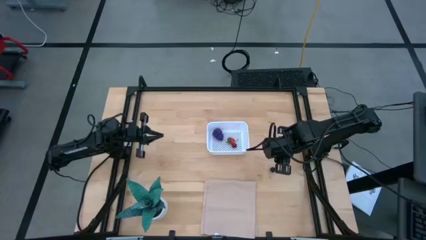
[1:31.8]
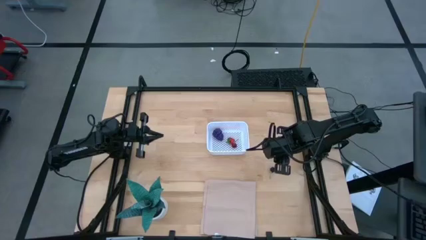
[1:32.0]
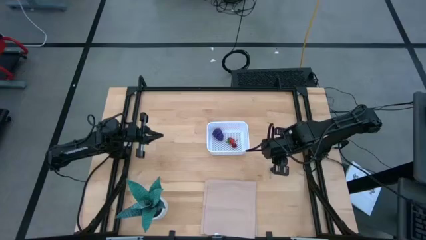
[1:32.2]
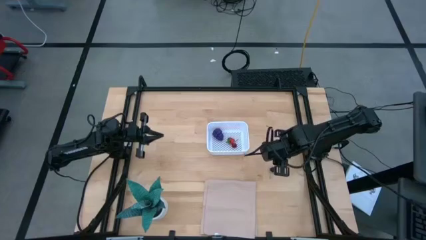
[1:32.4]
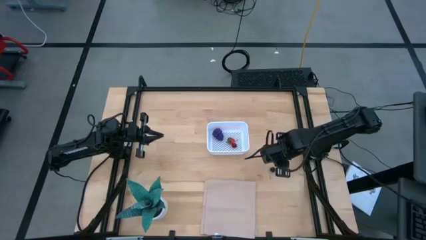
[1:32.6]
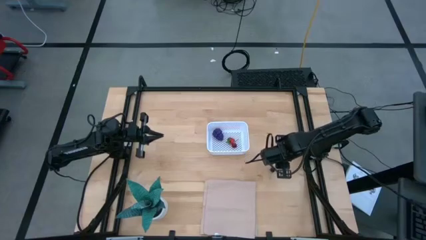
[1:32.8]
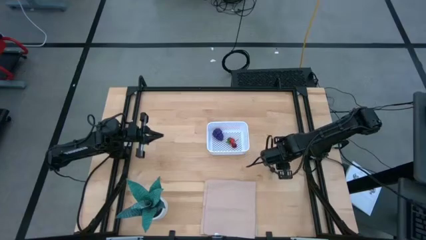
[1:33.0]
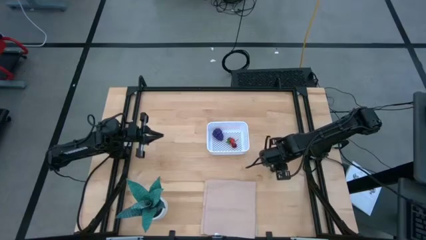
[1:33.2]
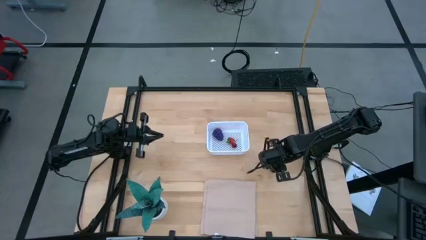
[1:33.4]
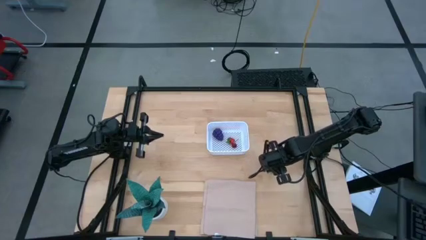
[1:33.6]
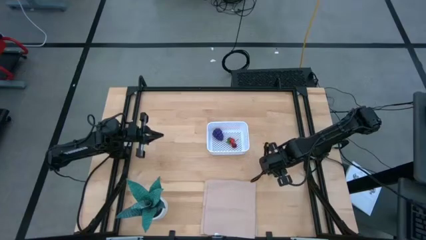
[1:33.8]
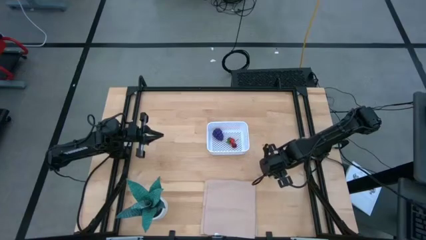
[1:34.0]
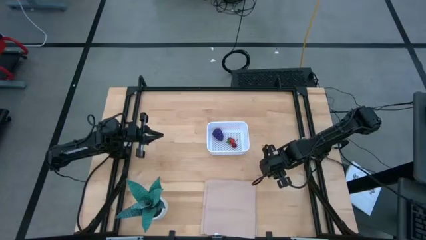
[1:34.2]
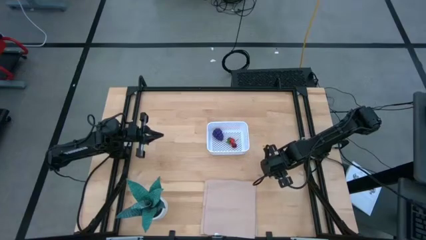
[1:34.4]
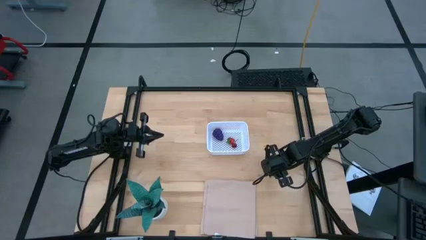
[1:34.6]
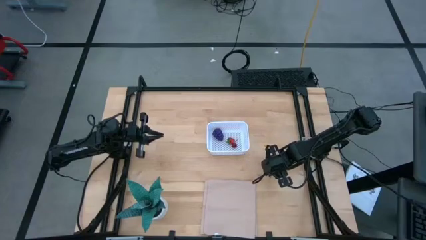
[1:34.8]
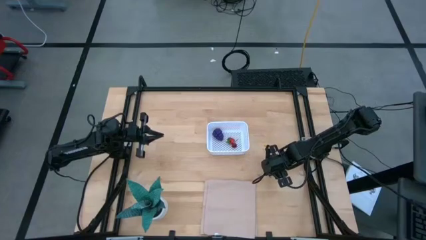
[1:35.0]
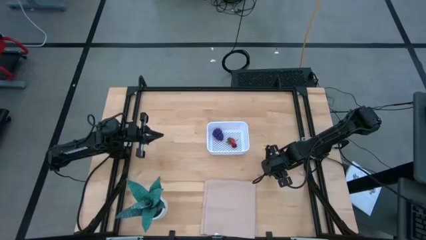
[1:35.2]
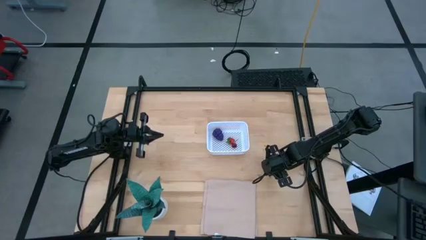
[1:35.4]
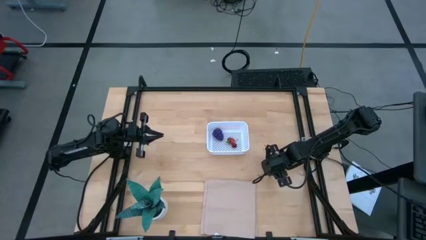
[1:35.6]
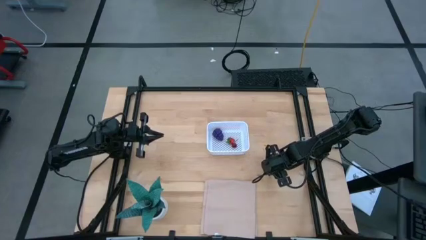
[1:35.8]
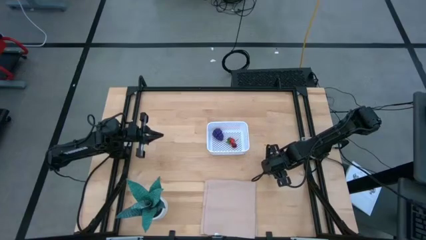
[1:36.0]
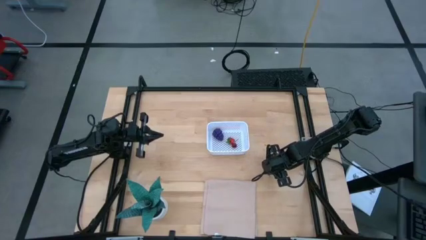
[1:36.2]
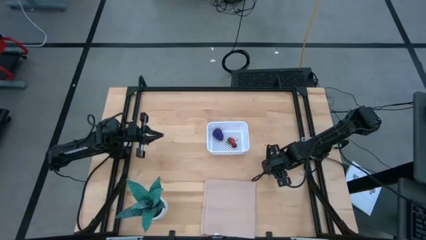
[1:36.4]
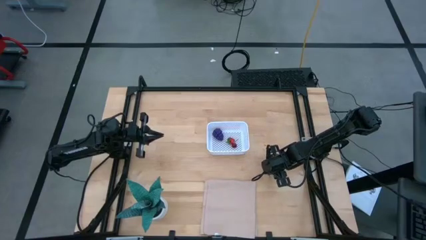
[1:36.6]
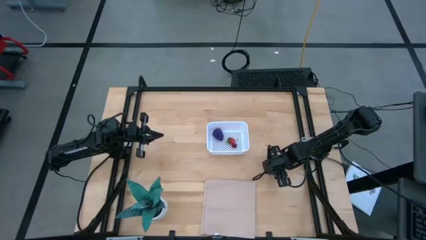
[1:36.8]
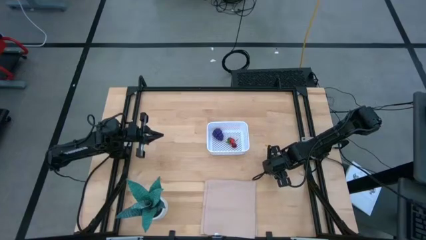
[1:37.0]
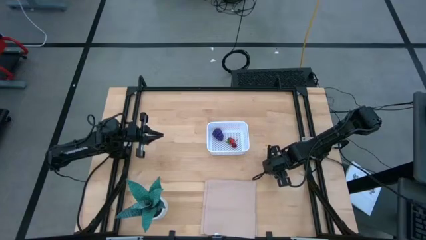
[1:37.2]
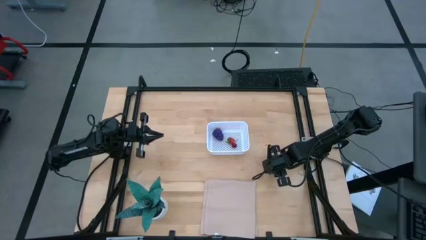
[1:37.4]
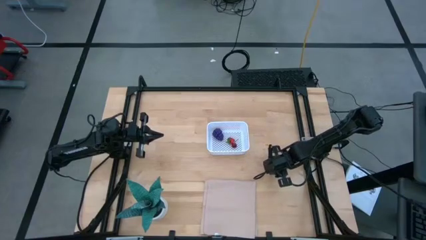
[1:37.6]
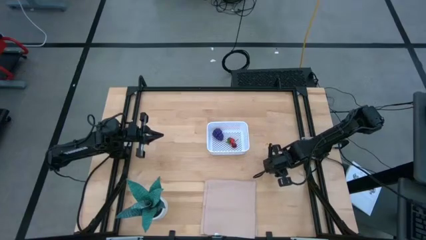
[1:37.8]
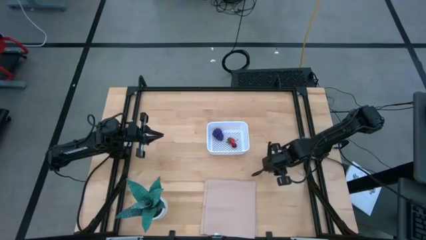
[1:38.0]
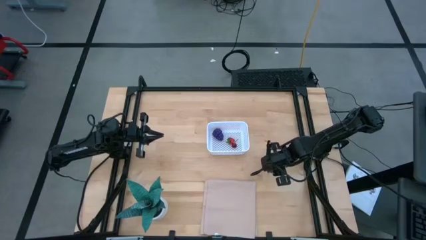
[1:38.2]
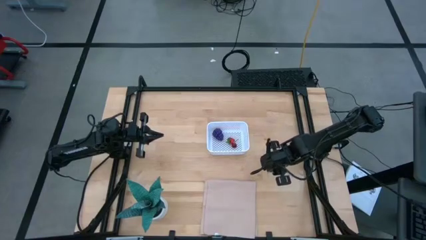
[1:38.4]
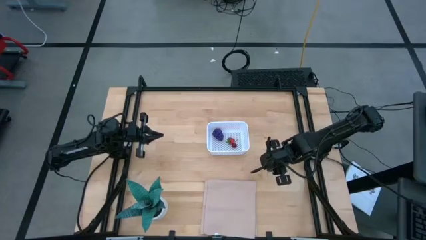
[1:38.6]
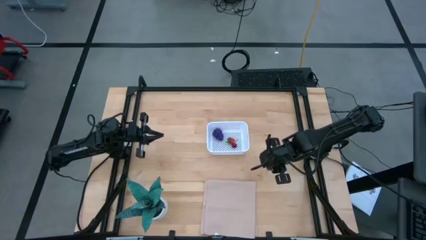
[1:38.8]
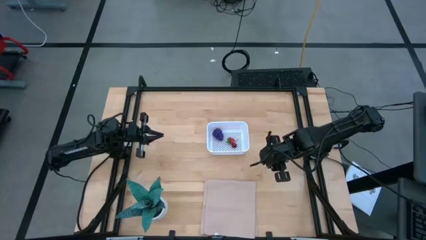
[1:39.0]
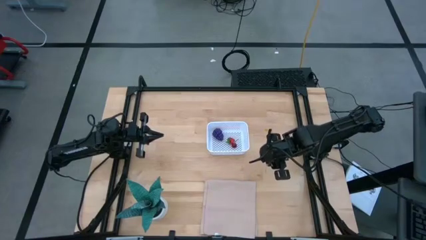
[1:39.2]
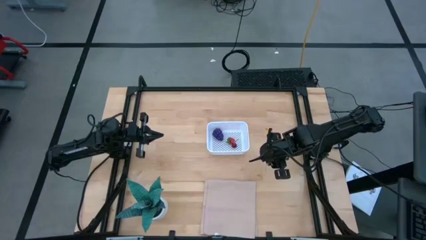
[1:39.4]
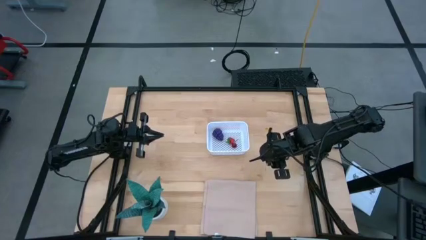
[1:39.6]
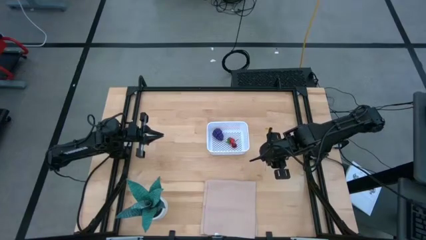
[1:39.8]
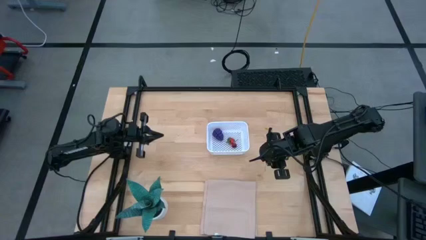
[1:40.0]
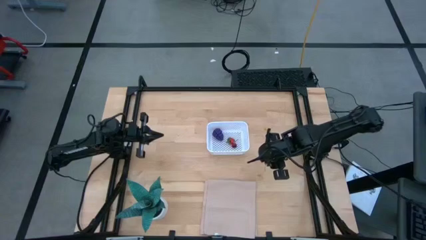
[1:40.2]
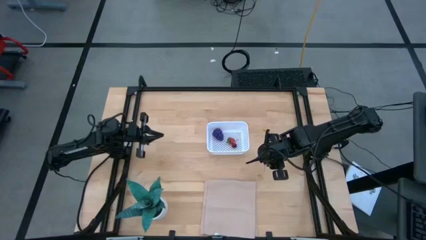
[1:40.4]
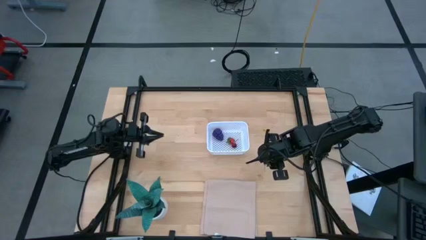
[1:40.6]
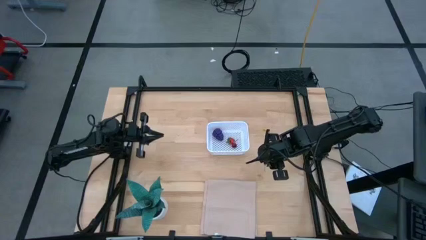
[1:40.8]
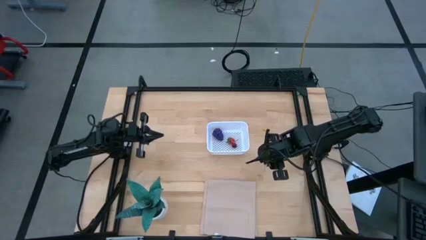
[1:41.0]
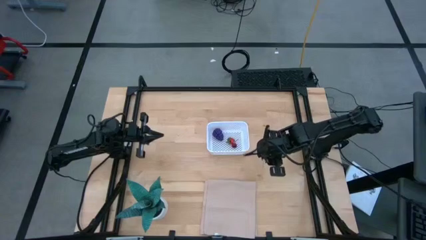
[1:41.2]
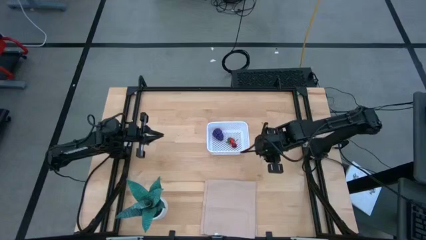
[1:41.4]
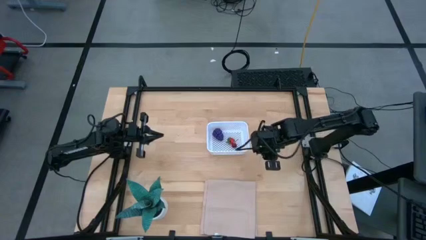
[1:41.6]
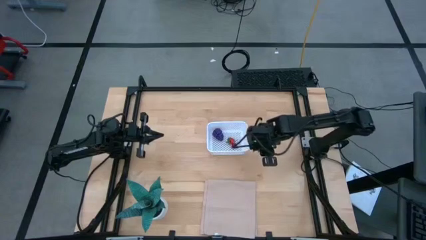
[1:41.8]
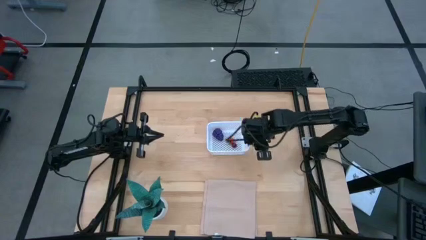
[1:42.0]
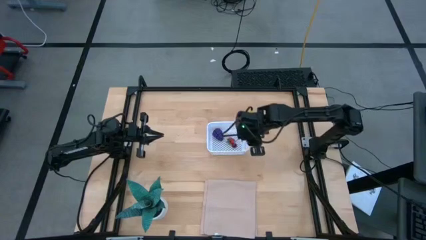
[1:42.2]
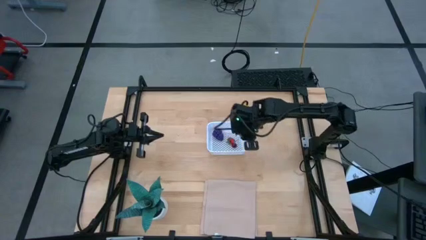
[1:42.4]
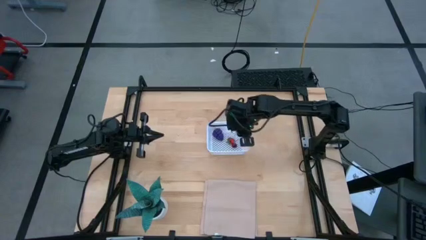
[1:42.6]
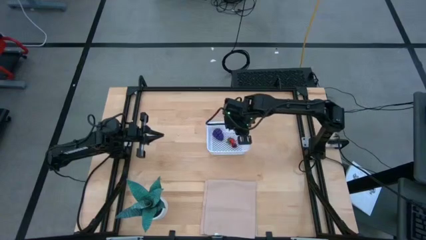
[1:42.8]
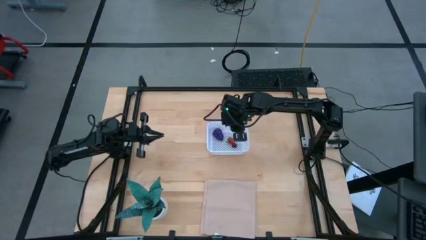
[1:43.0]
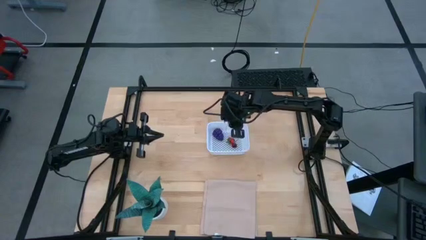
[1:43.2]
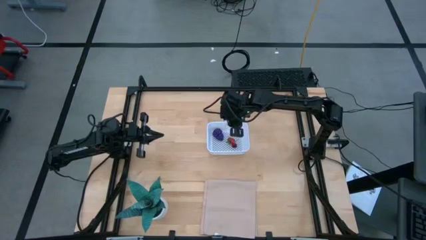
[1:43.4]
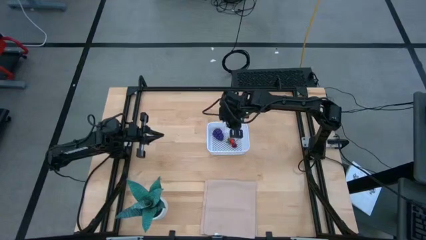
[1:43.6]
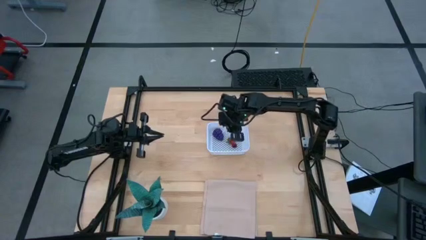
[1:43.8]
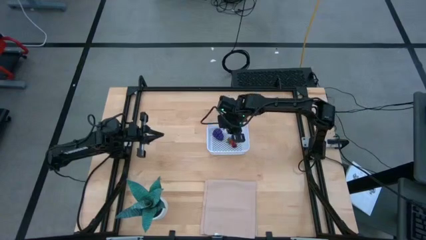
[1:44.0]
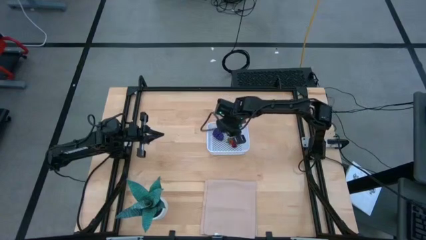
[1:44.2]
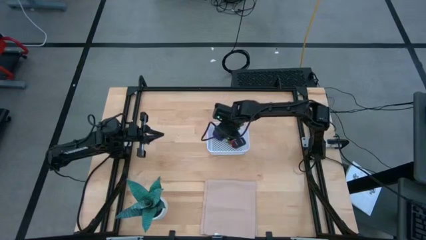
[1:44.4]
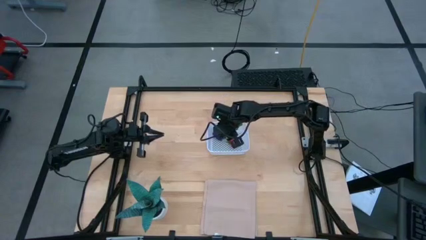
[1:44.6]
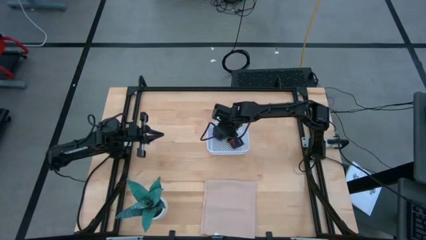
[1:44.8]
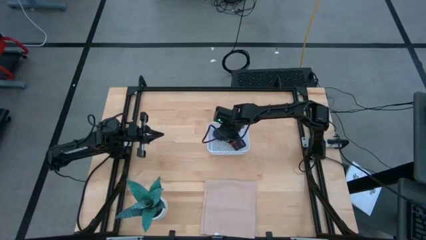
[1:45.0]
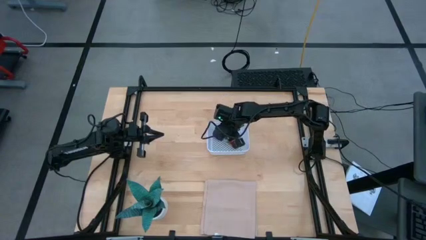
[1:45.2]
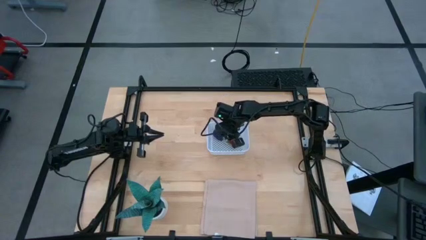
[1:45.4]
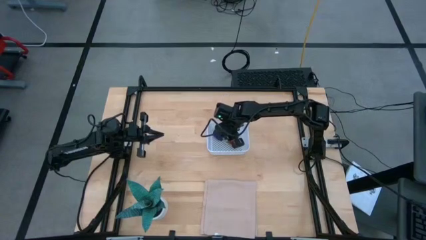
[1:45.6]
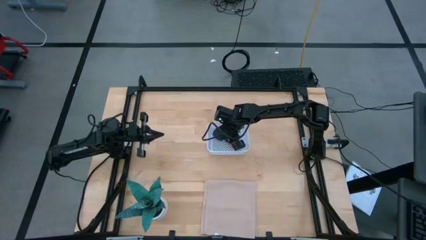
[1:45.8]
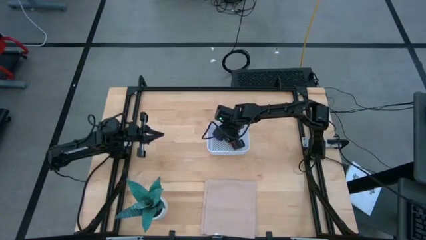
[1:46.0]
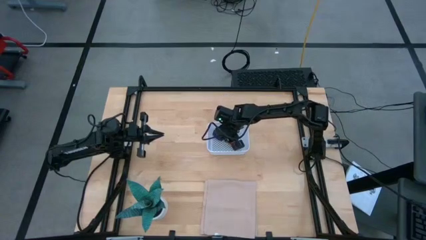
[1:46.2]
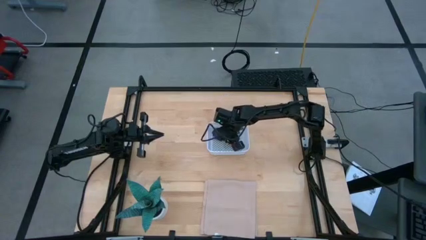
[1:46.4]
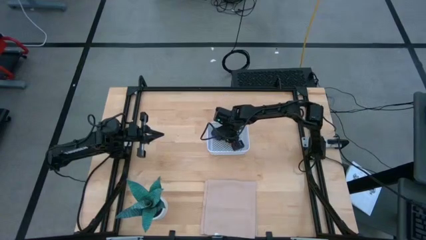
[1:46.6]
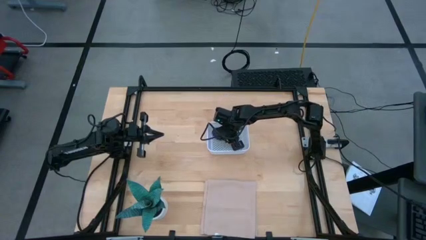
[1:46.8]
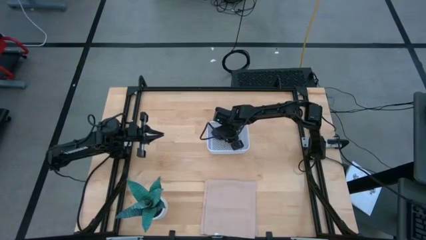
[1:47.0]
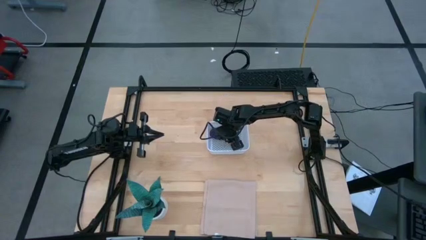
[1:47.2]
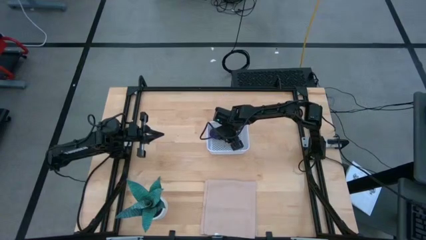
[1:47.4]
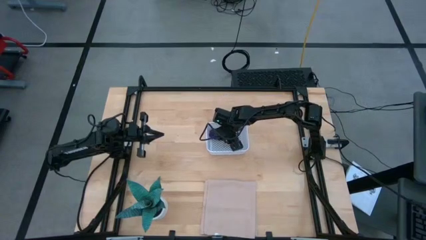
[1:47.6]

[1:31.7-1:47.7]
Task: Pick and placing Produce into tupperware
Put the black cherry into the white bin
